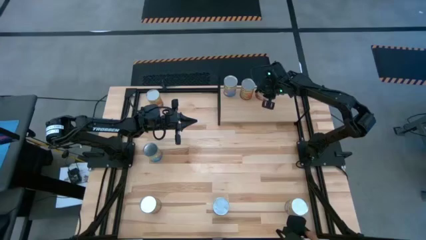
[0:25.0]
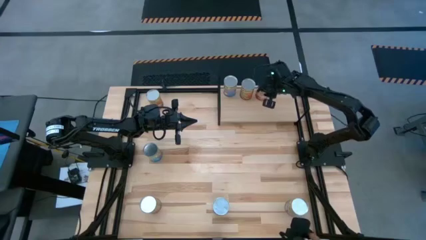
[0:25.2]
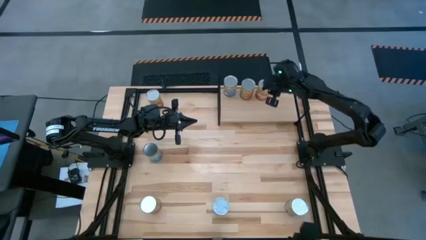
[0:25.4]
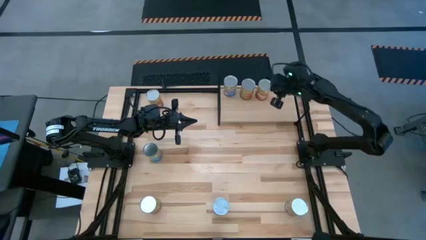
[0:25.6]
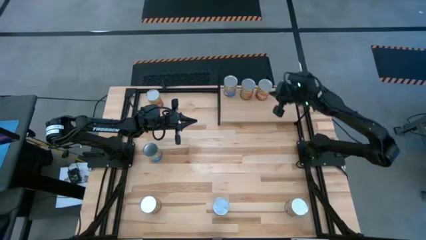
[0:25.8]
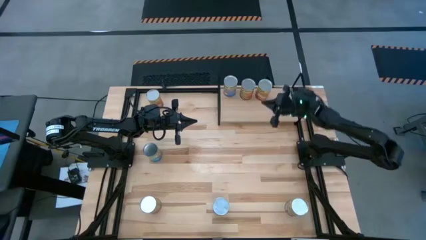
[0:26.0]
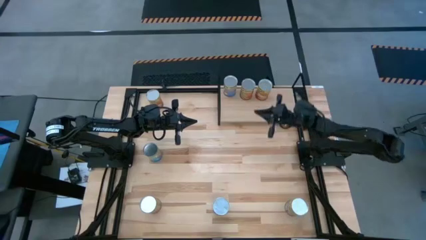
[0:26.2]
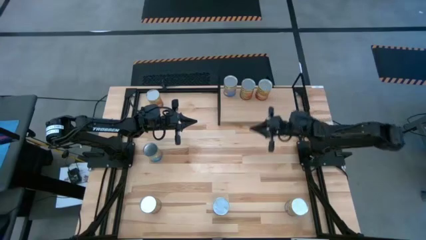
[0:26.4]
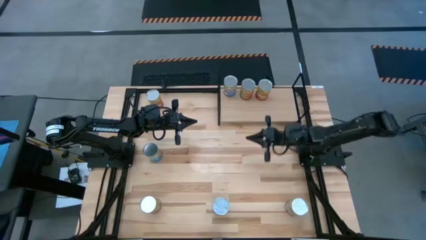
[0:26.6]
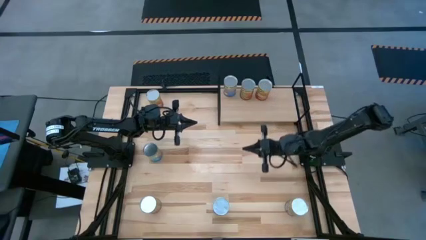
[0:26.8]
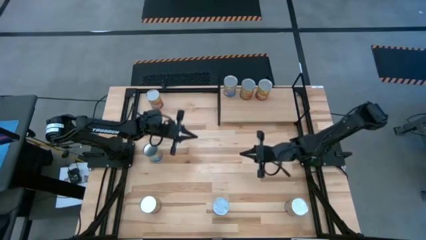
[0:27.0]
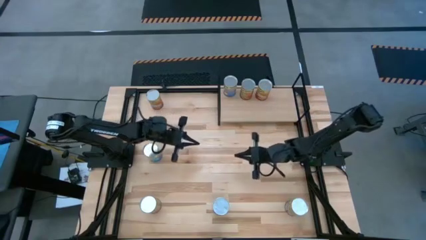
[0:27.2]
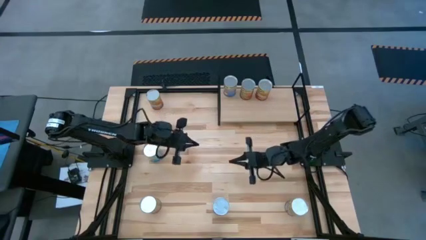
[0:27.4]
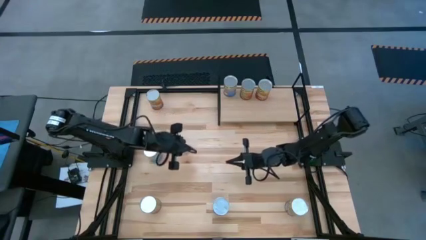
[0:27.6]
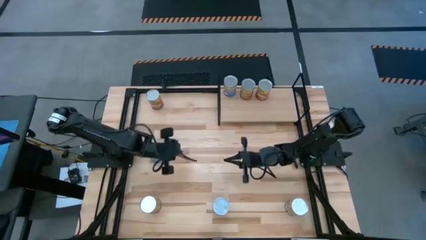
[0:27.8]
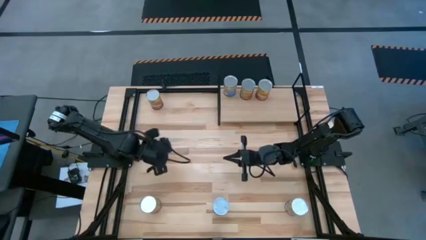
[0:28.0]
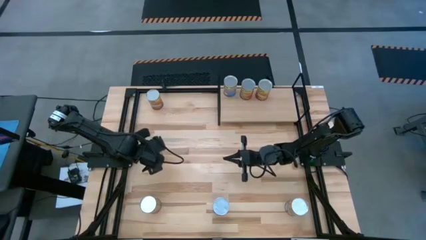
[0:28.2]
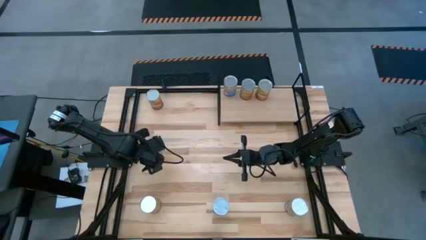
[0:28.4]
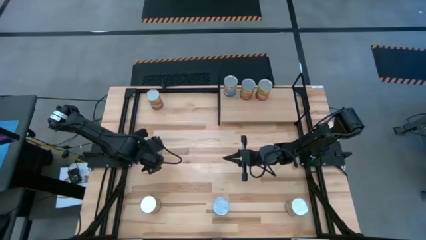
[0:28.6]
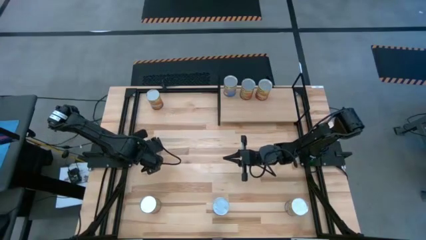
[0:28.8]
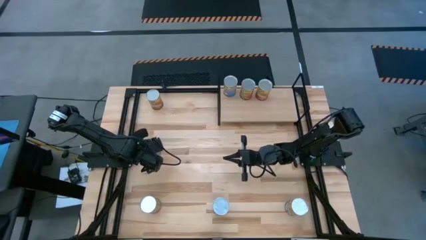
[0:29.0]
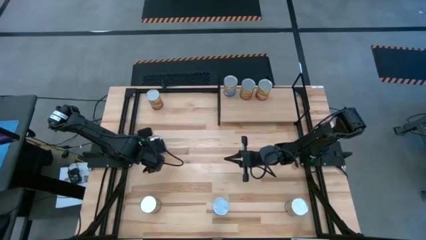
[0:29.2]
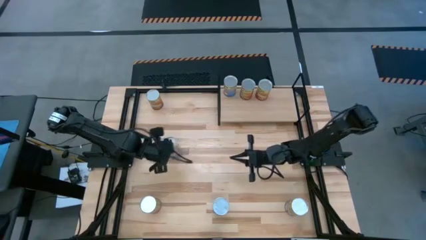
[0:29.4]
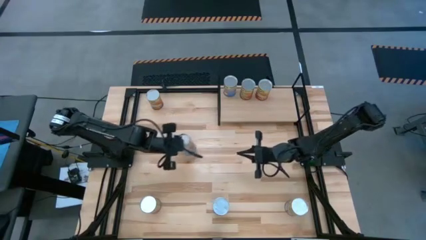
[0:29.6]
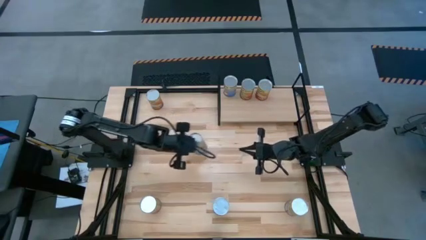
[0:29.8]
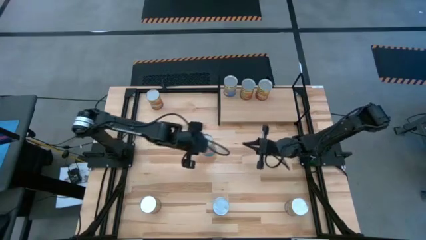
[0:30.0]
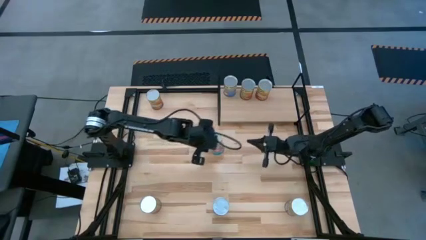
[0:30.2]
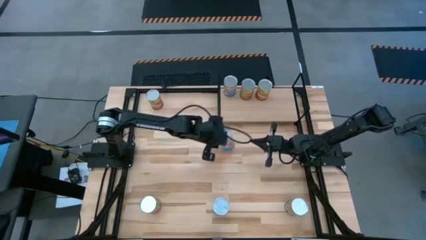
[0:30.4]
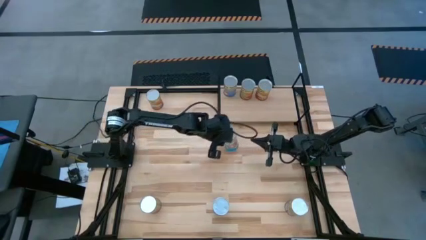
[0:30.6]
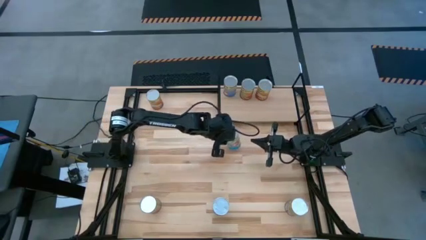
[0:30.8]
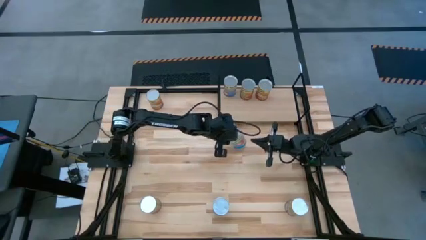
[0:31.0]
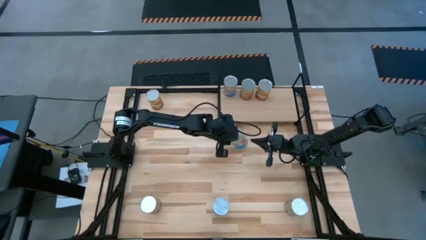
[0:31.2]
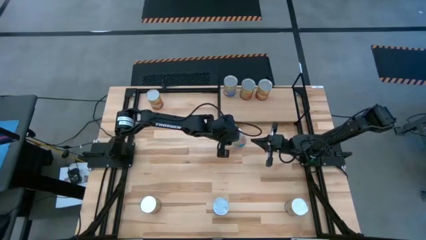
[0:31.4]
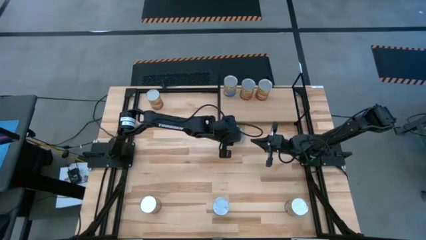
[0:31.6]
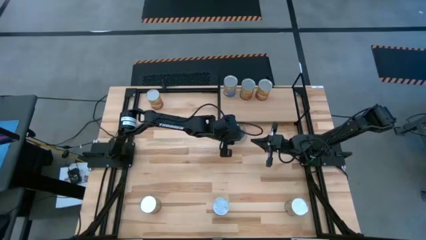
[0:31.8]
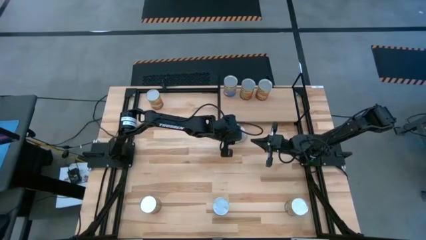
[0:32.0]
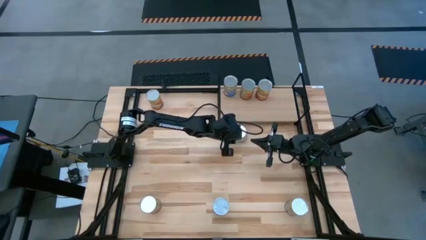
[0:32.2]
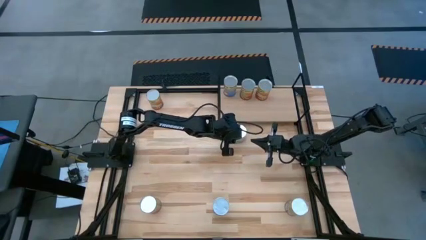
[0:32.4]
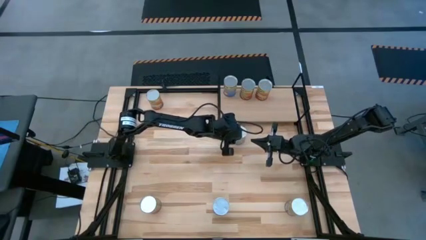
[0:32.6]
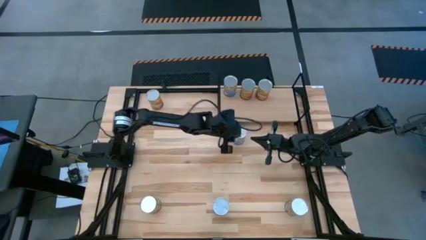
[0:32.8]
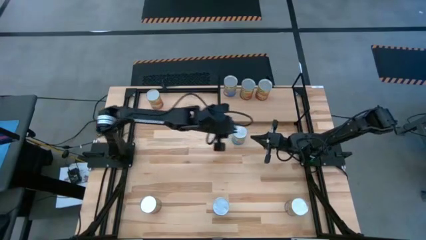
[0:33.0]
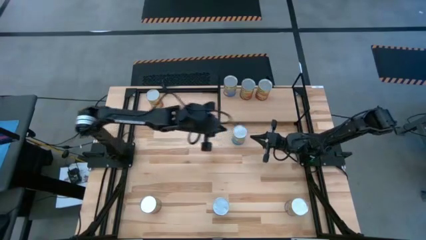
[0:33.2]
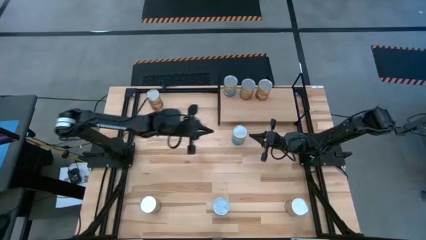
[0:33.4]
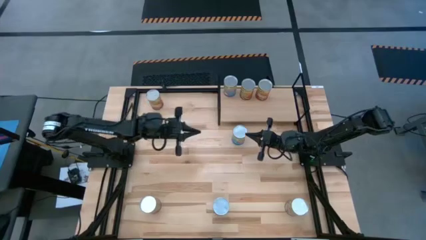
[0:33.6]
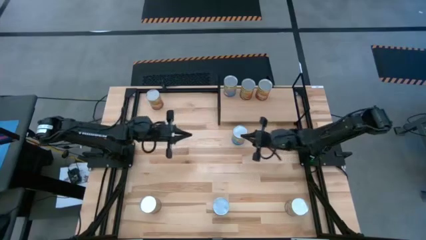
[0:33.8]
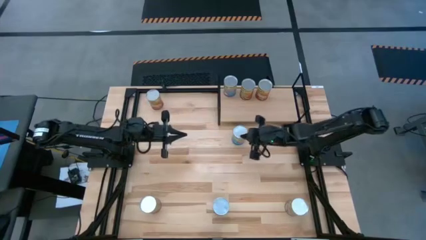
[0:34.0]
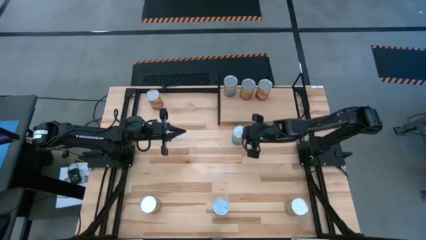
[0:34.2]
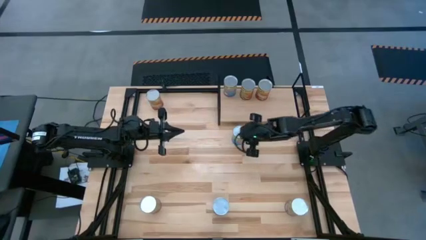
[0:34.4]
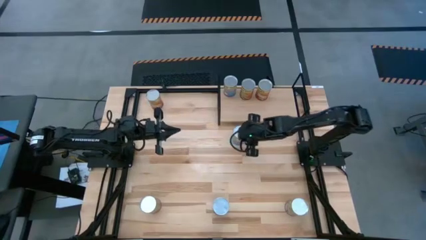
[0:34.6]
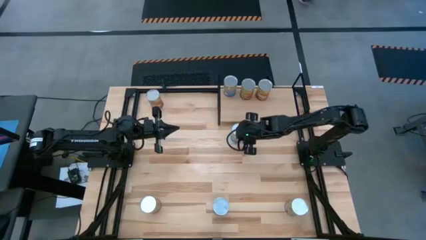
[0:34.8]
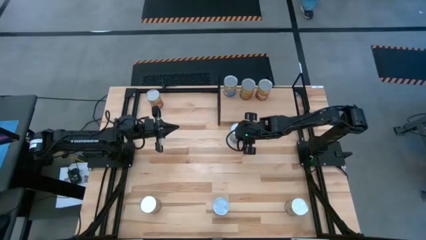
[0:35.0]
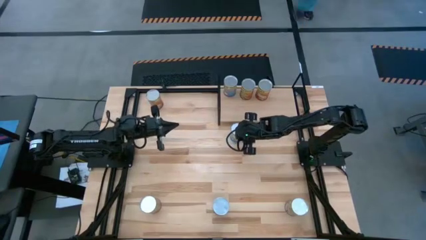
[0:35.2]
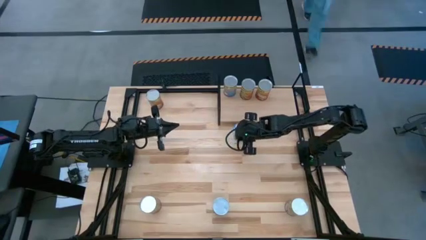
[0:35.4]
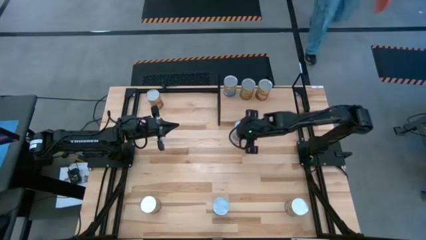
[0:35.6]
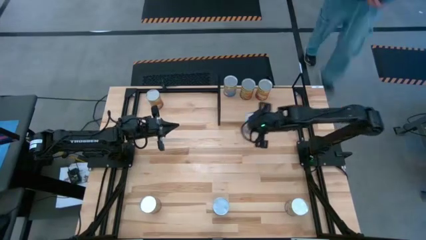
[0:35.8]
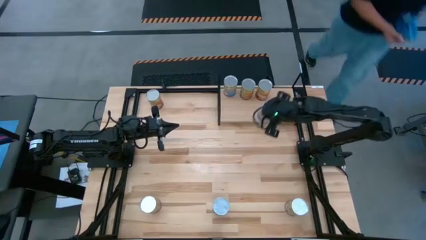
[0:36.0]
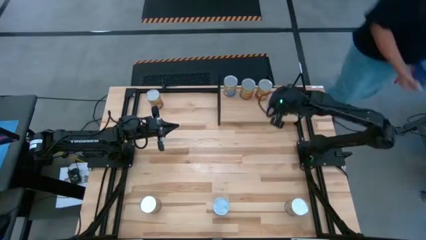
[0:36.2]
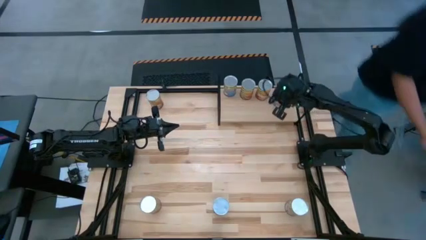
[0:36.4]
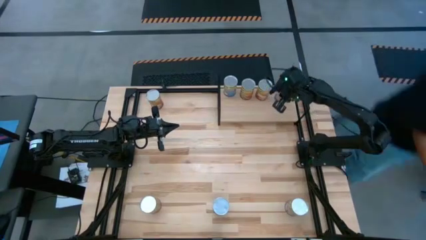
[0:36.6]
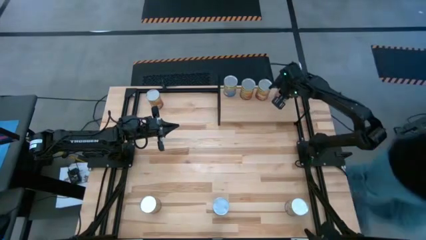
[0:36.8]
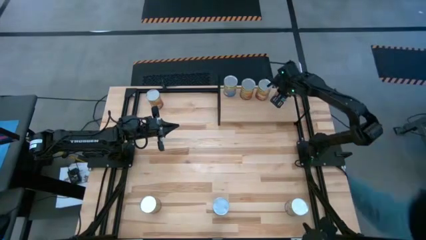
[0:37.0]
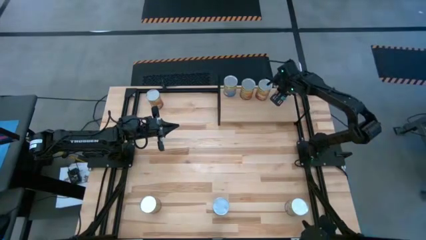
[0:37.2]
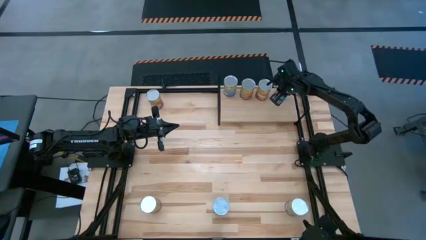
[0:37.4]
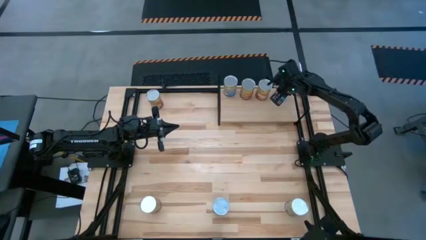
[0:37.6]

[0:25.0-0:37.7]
Task: Pick and place cans onto a shelf
Put the canned tomatoes on the shelf

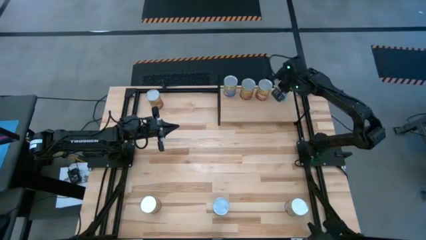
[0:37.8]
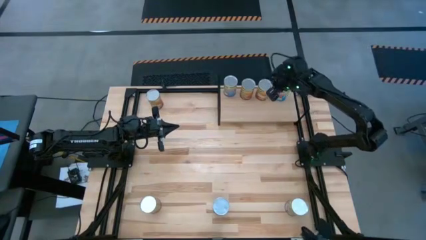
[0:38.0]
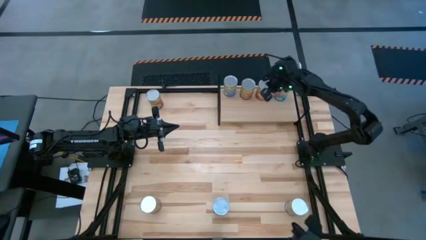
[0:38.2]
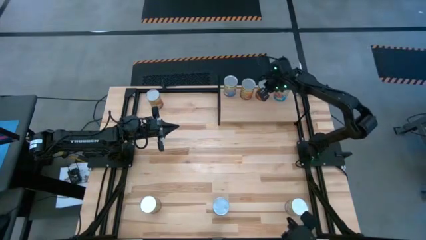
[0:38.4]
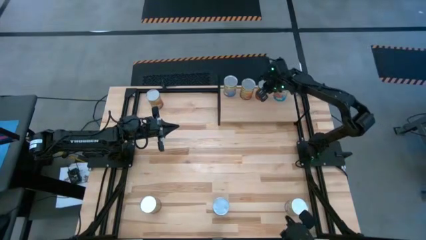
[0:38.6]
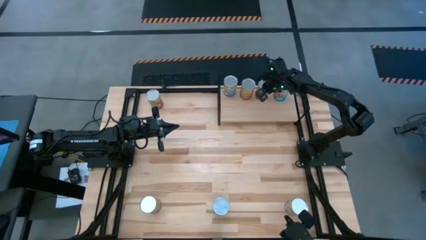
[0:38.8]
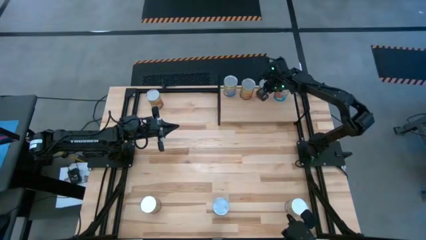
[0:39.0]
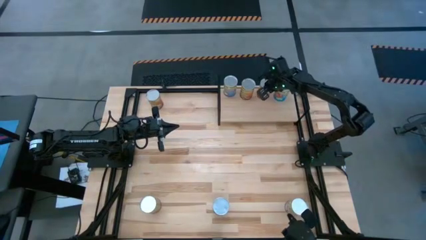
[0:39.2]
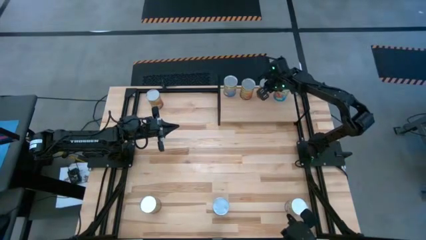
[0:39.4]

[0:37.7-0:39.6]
Adjust the canned corn on the shelf

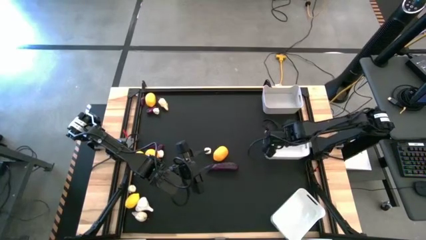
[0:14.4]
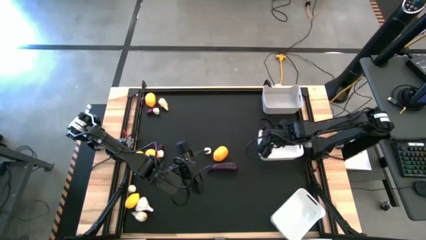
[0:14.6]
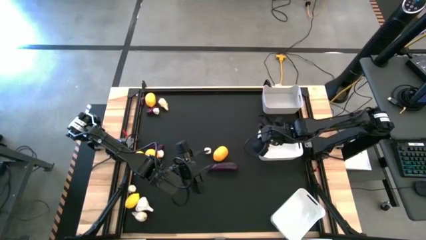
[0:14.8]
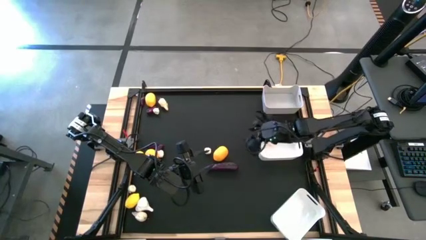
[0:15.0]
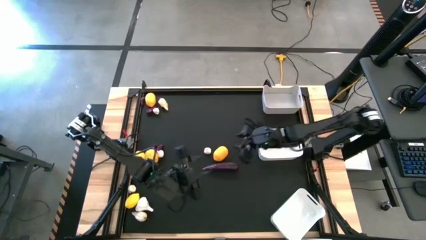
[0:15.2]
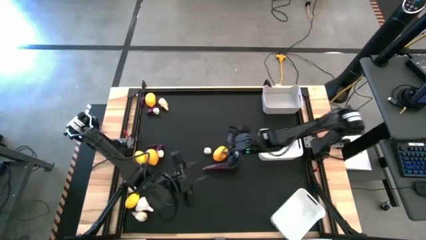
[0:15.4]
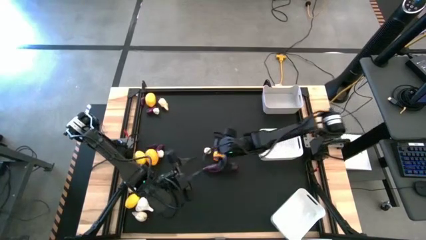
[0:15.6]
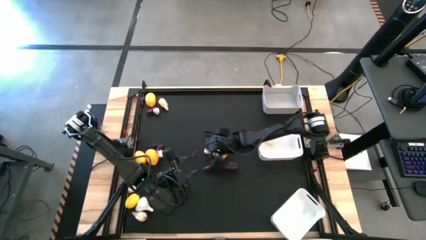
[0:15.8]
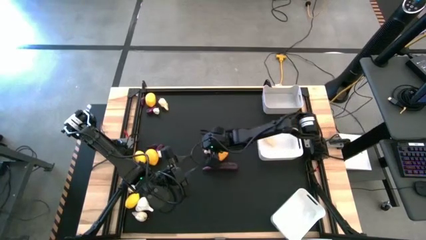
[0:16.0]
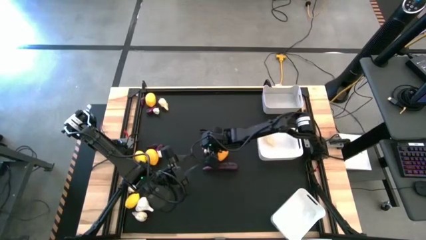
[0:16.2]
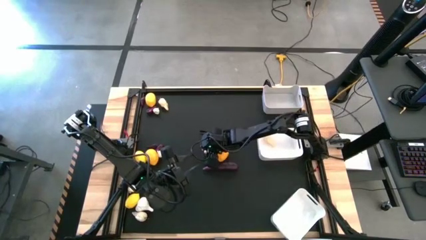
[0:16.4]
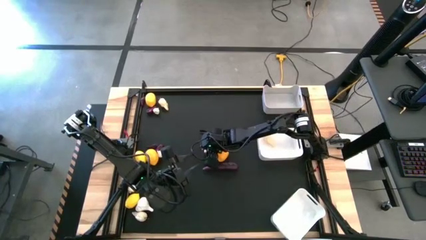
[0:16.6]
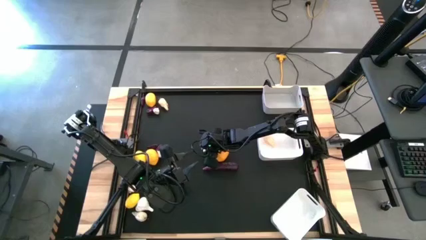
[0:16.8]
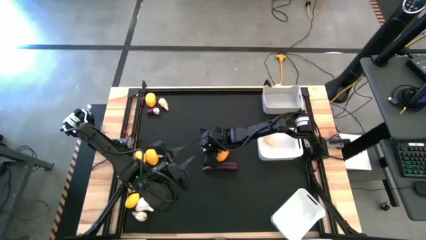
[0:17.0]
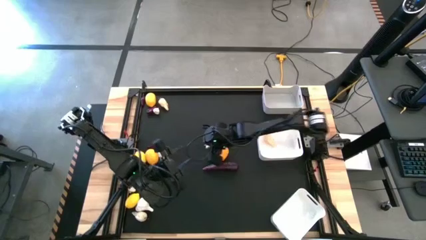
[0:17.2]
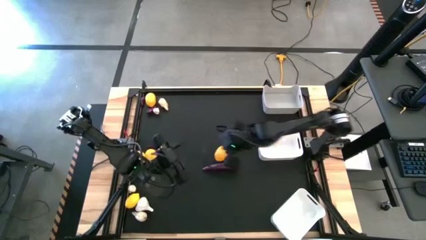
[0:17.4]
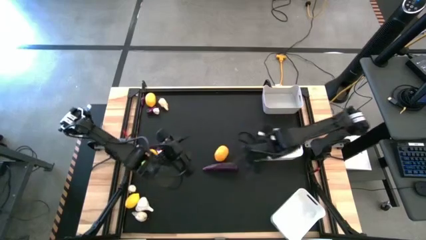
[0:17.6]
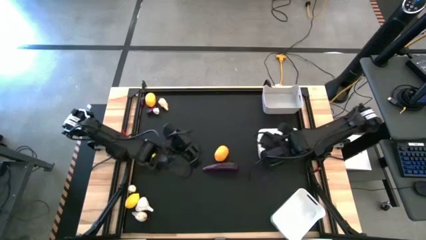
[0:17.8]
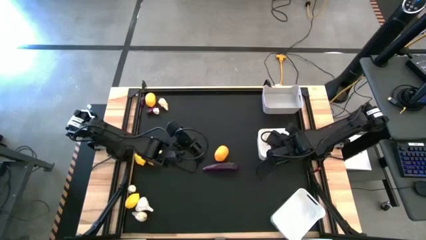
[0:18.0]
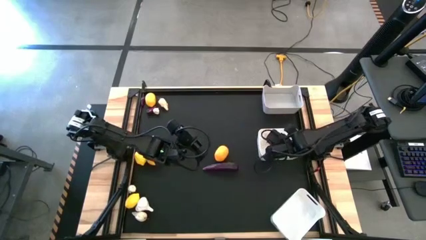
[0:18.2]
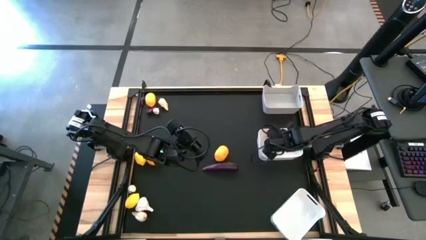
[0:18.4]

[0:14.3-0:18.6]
Task: Sort produce into baskets
Put the garlic into the top white bin
